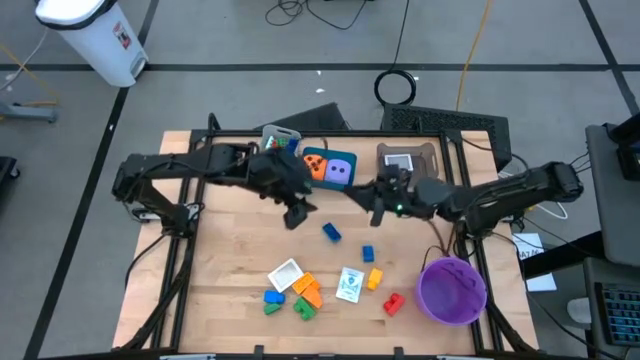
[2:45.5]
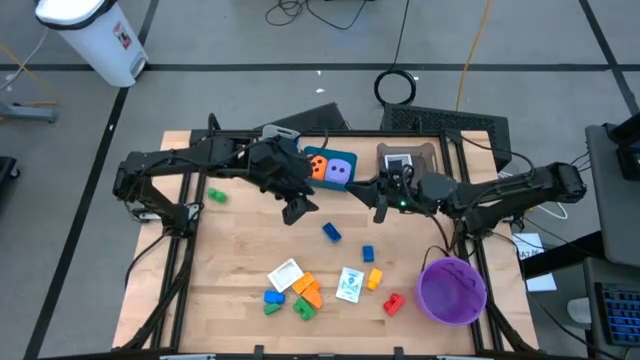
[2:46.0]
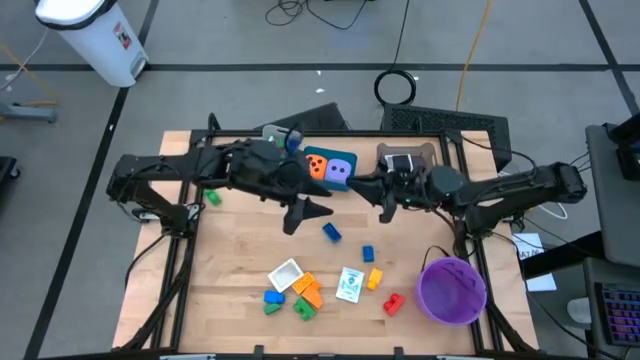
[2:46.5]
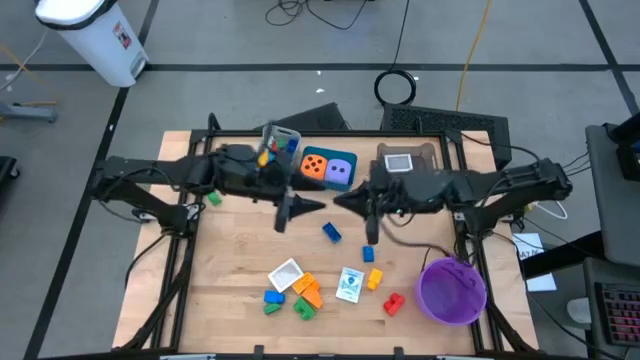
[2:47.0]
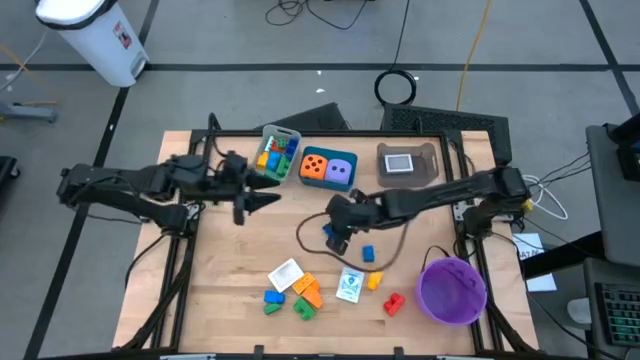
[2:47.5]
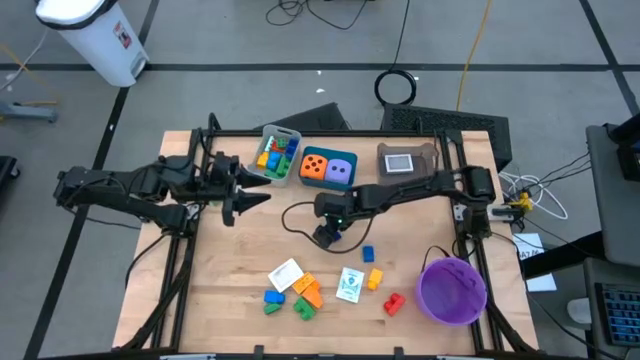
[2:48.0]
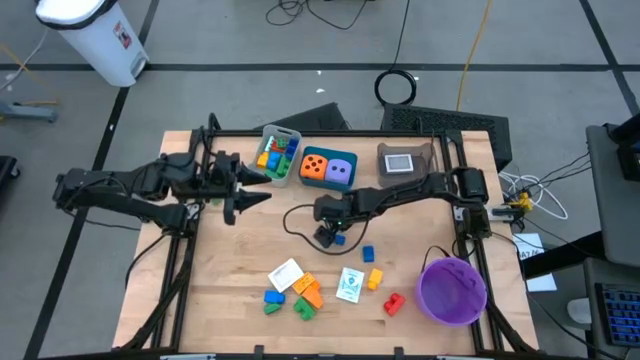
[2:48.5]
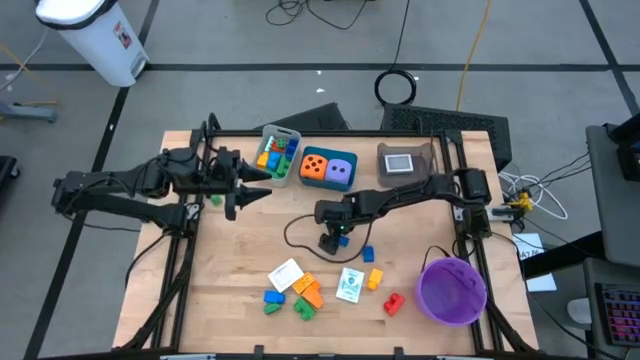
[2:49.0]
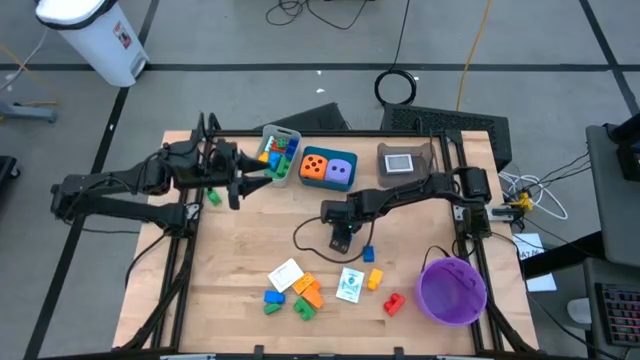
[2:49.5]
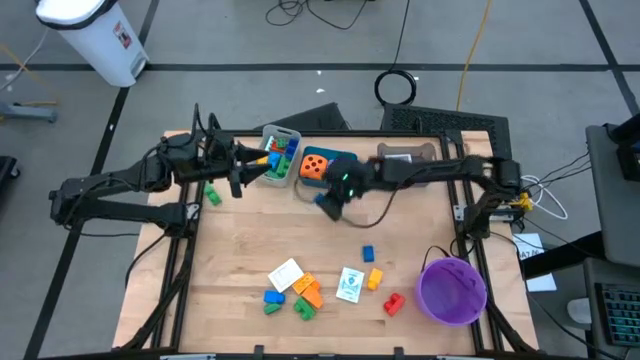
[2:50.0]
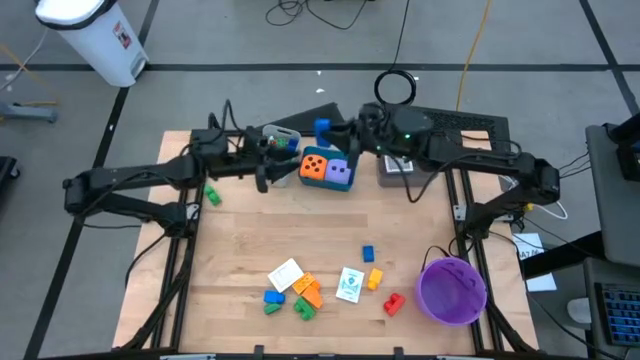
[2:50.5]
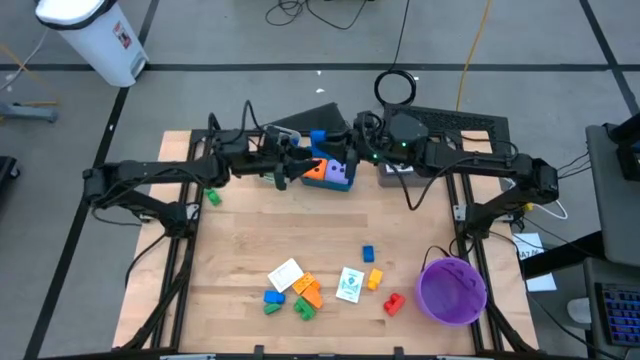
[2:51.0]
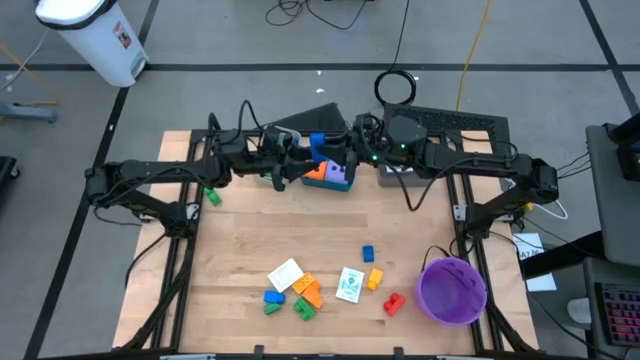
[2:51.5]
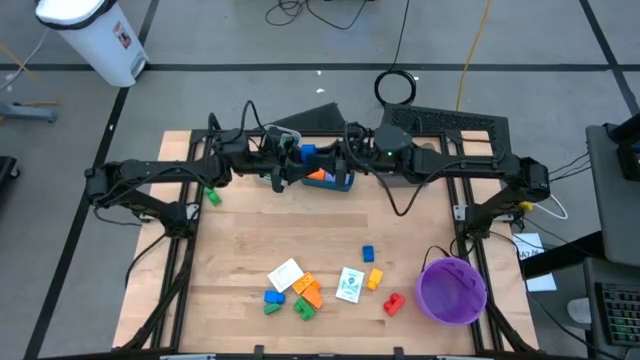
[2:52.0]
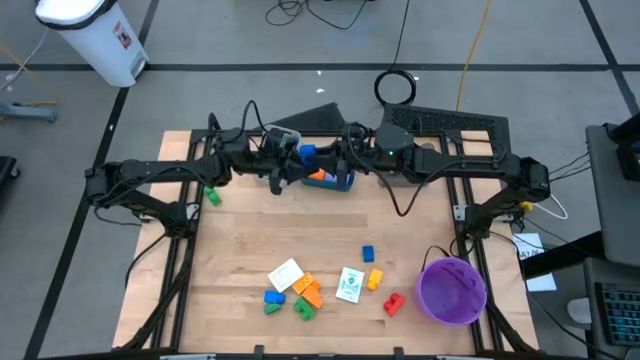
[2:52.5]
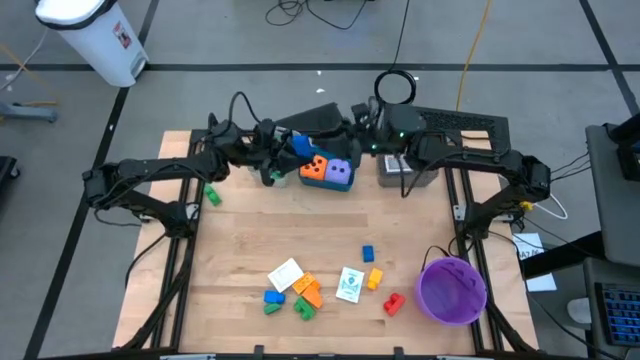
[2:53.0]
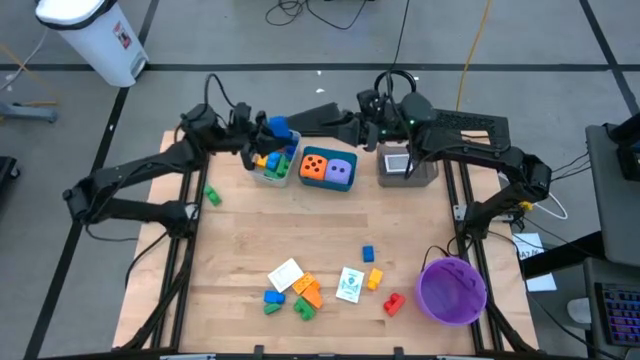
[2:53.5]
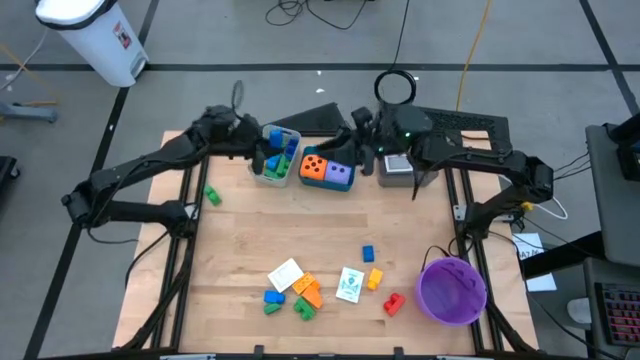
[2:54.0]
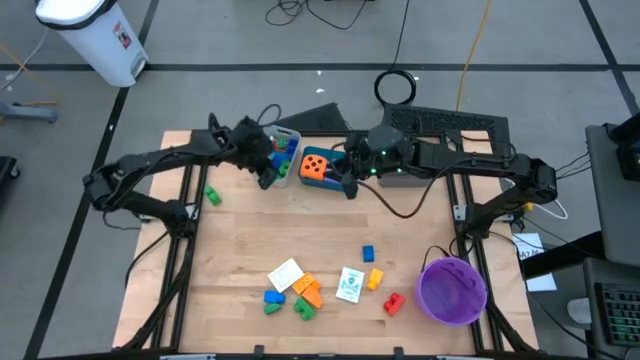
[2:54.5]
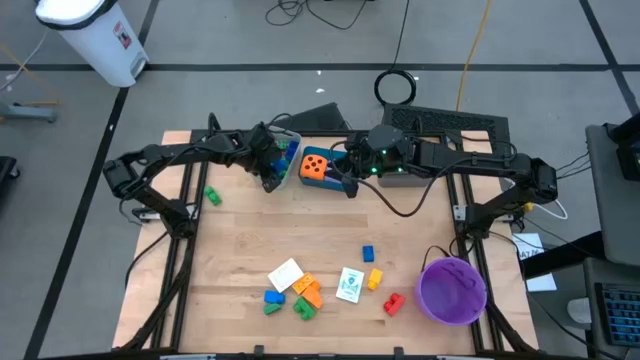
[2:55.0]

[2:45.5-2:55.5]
Task: Pick & Place Toys
Put the blue game piece into the gray bin

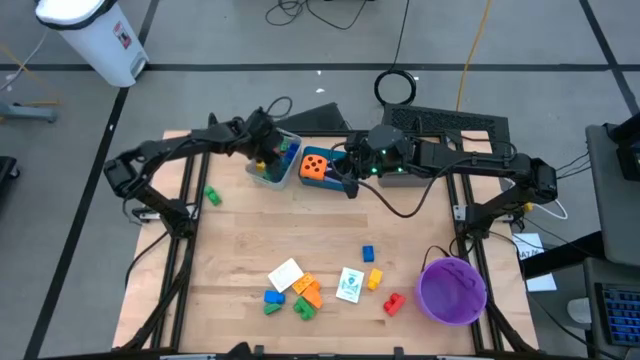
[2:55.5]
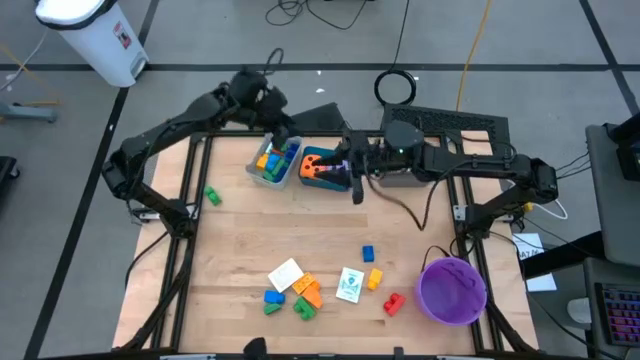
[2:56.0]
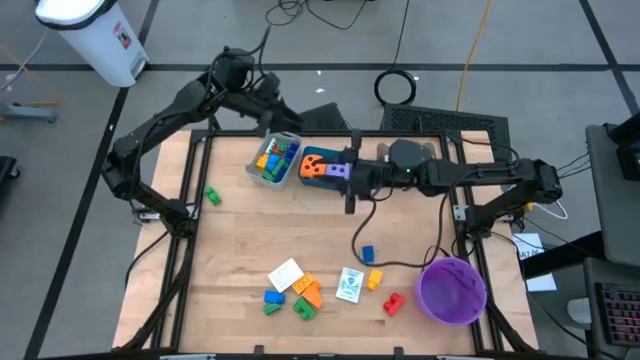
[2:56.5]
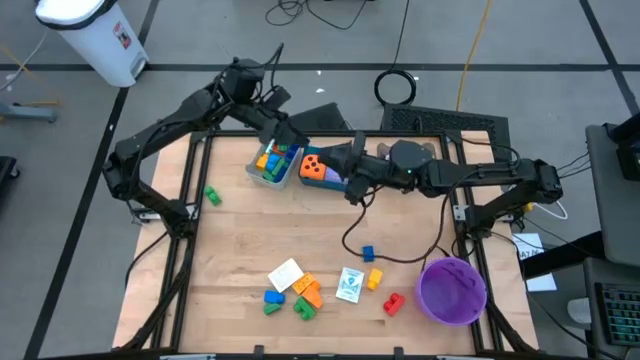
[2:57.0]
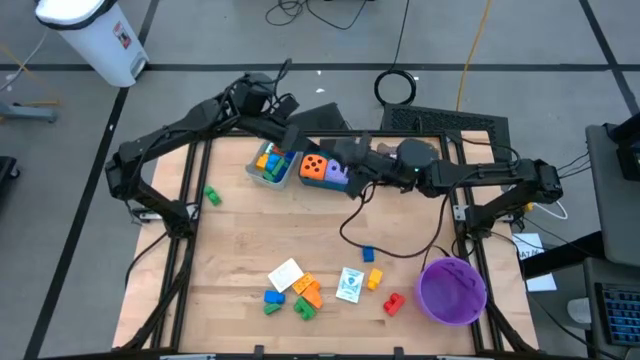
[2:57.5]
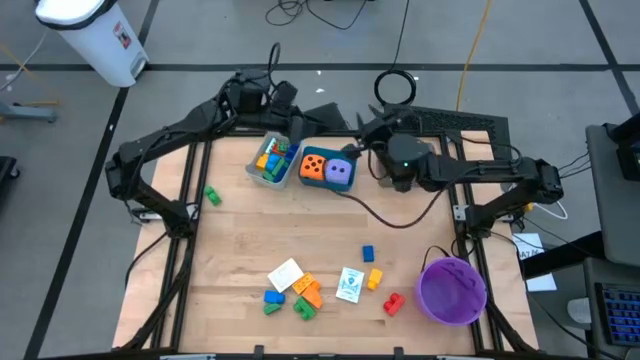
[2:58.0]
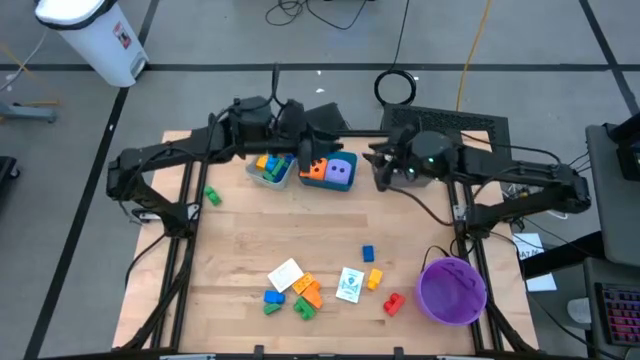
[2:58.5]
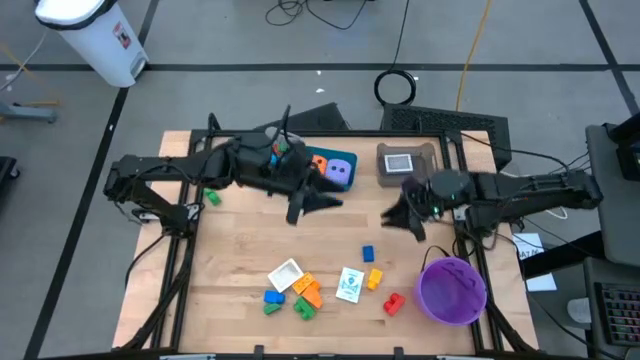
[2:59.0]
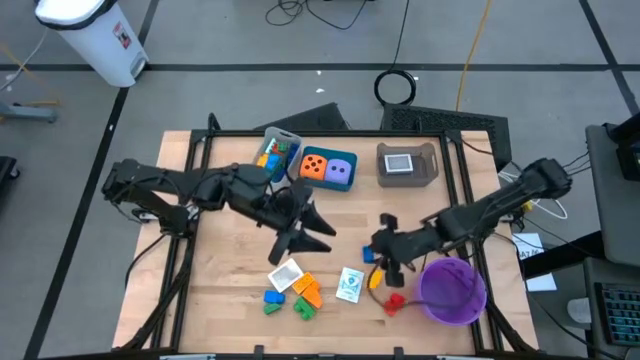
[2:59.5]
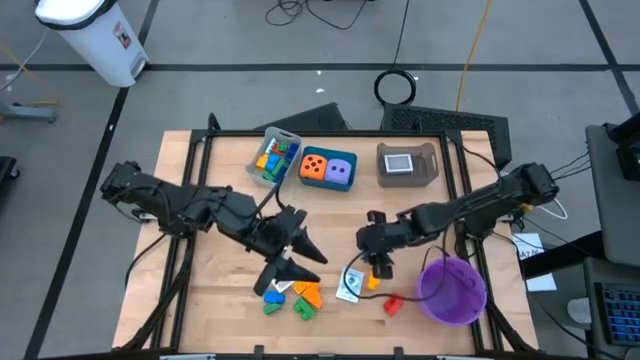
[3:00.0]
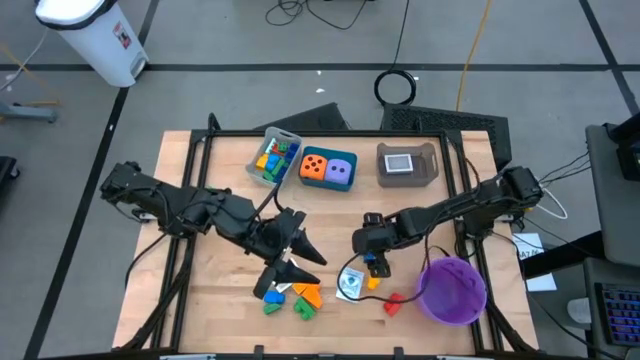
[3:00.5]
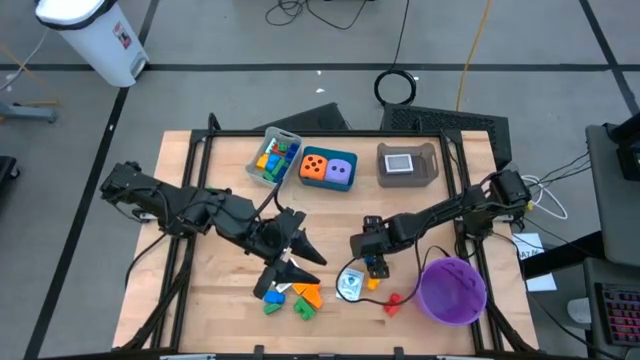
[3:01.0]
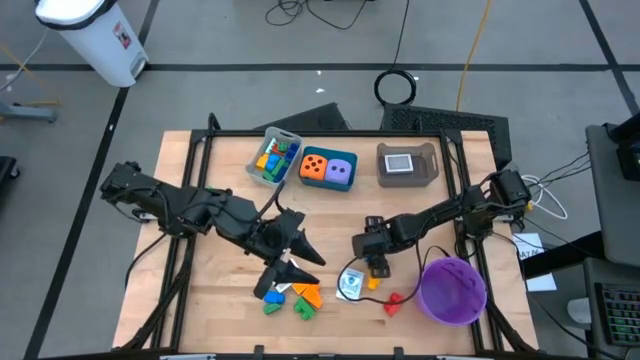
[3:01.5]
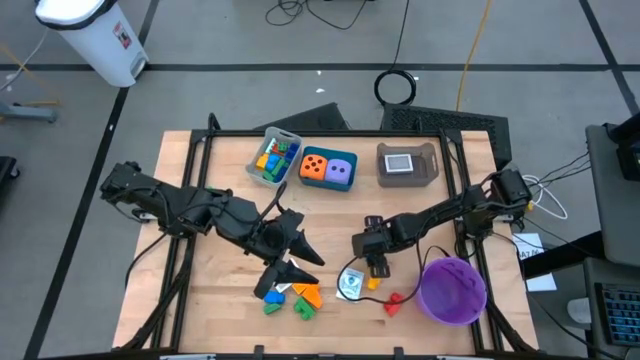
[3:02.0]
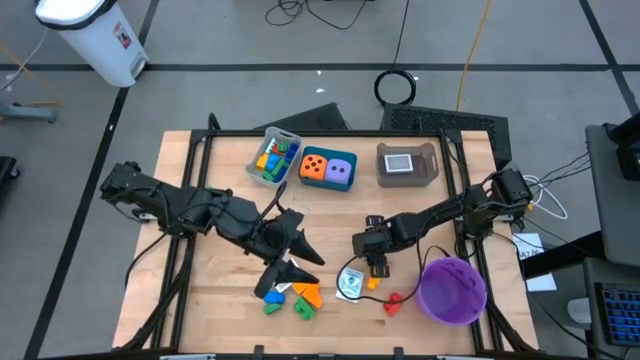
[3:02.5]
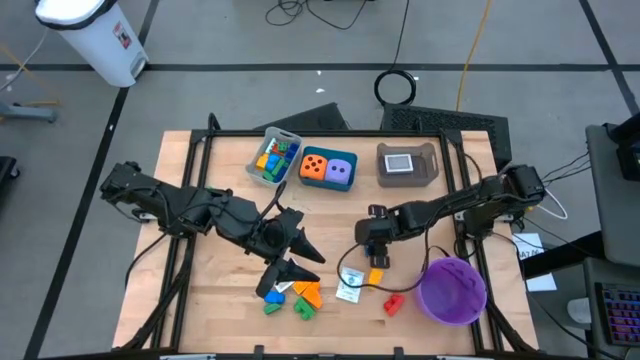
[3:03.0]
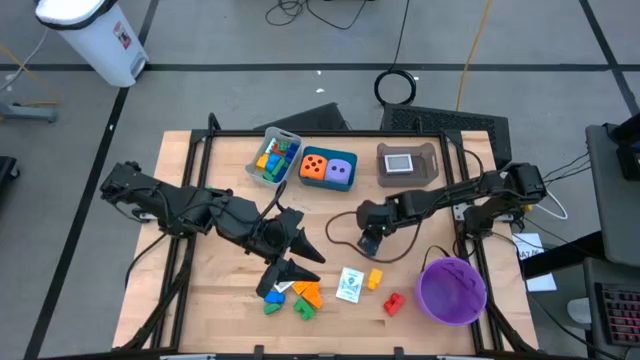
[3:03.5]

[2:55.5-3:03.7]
Put the blue game piece into the gray bin
